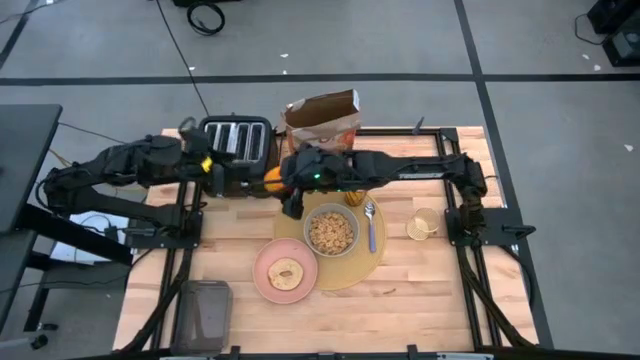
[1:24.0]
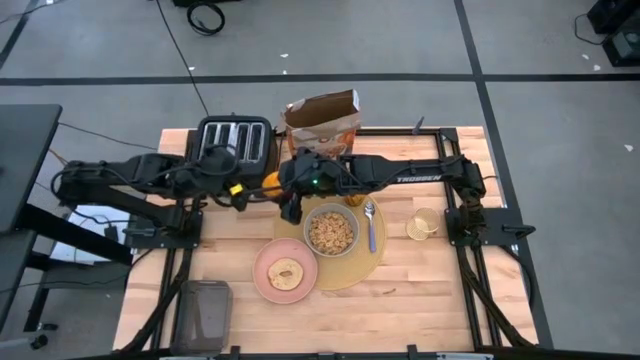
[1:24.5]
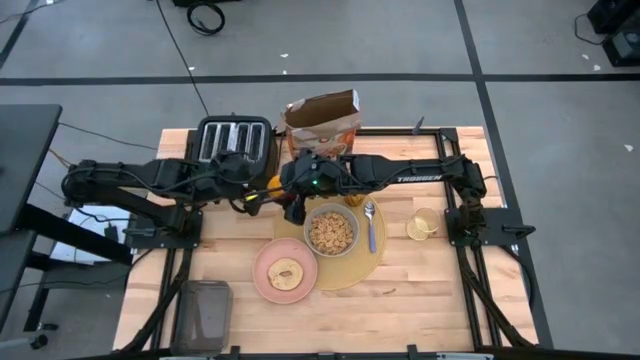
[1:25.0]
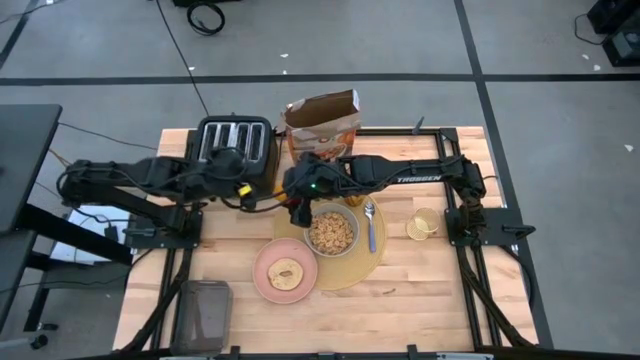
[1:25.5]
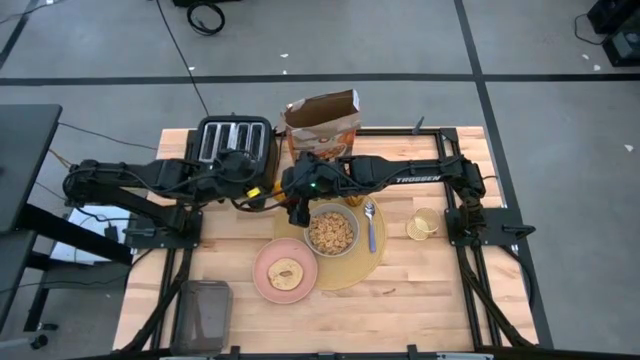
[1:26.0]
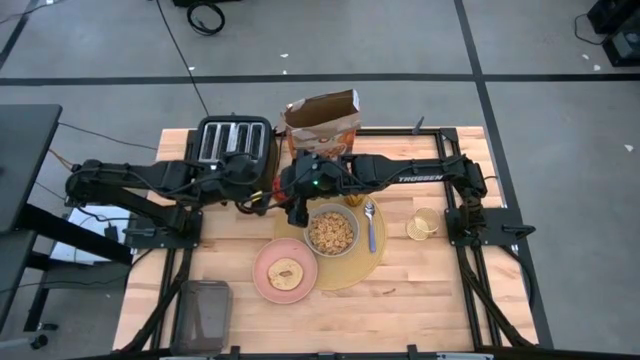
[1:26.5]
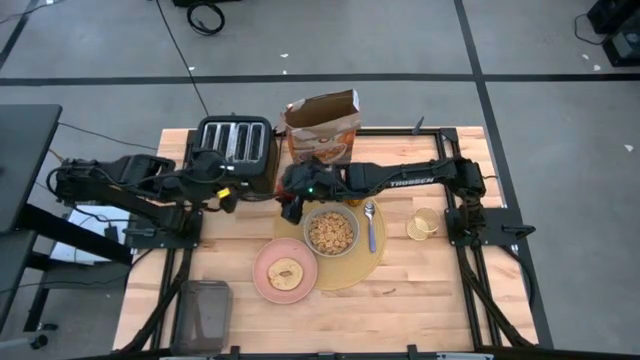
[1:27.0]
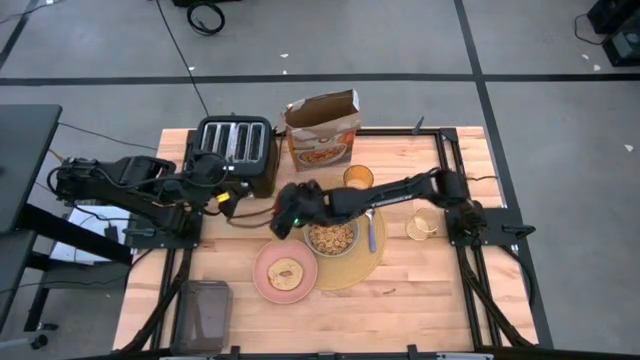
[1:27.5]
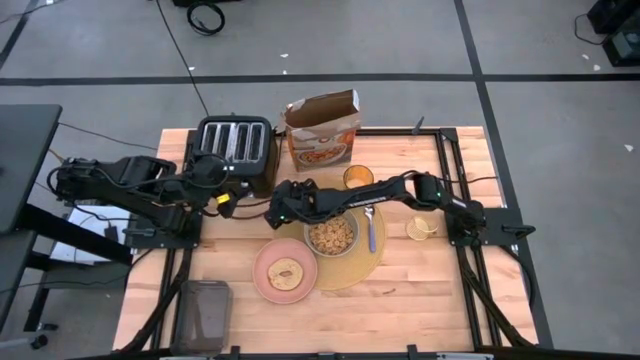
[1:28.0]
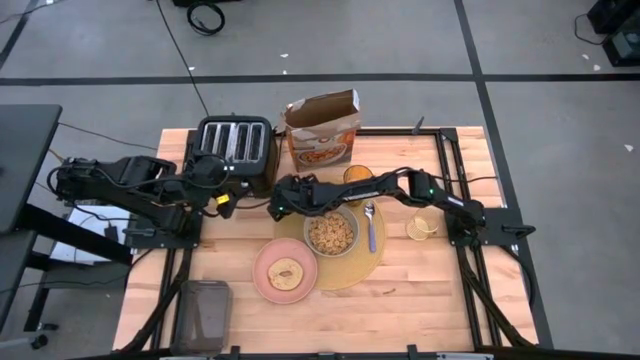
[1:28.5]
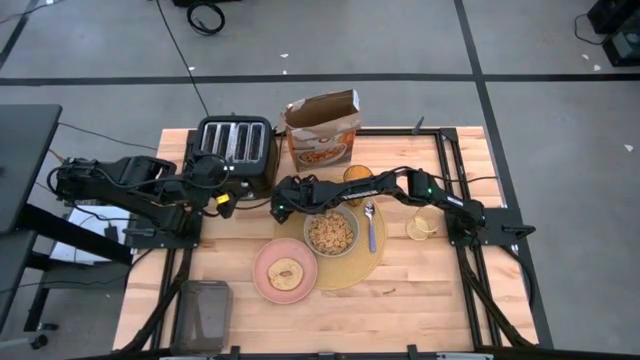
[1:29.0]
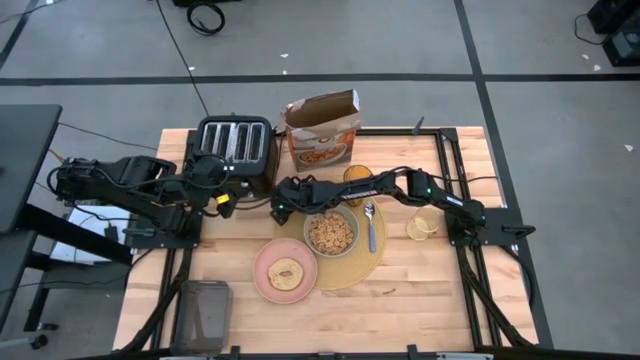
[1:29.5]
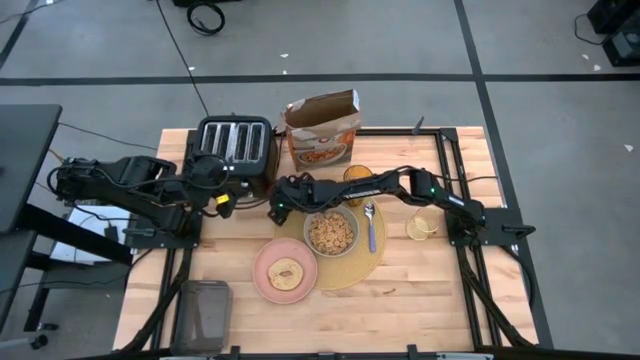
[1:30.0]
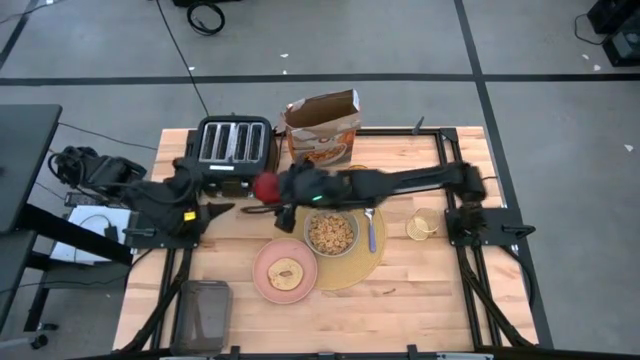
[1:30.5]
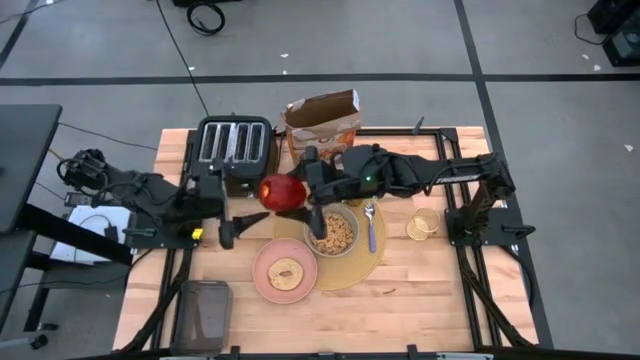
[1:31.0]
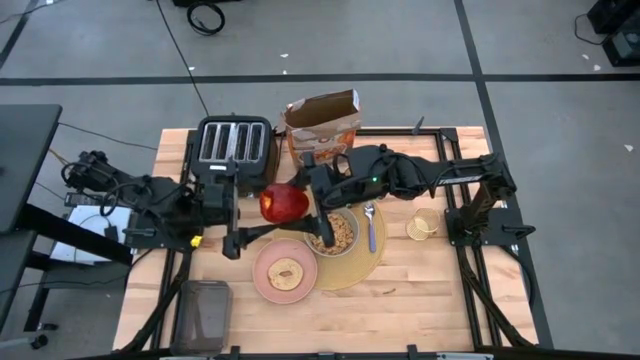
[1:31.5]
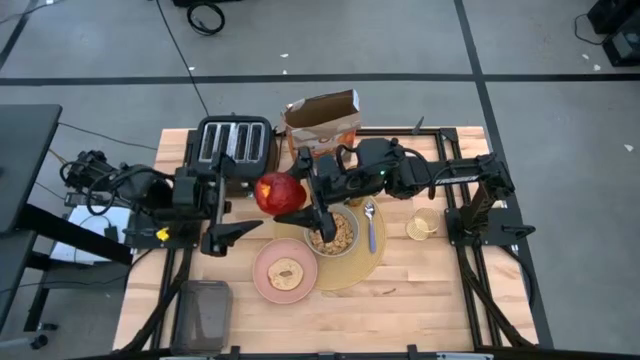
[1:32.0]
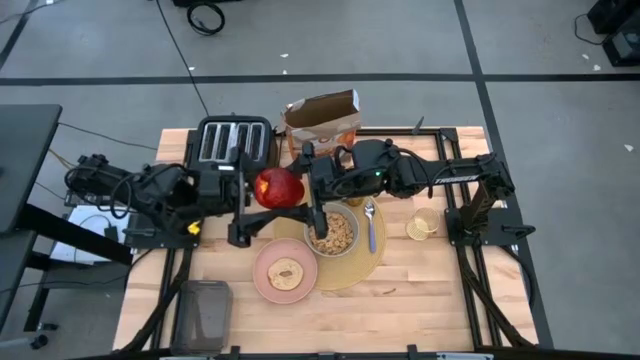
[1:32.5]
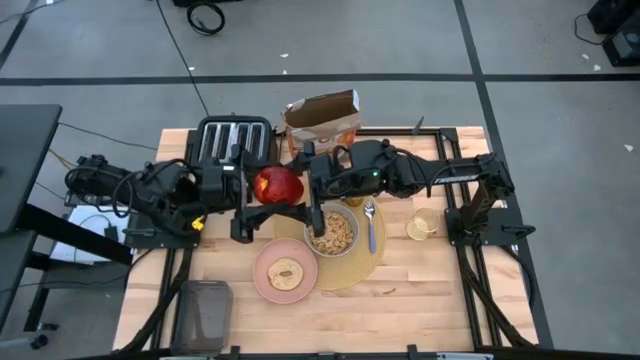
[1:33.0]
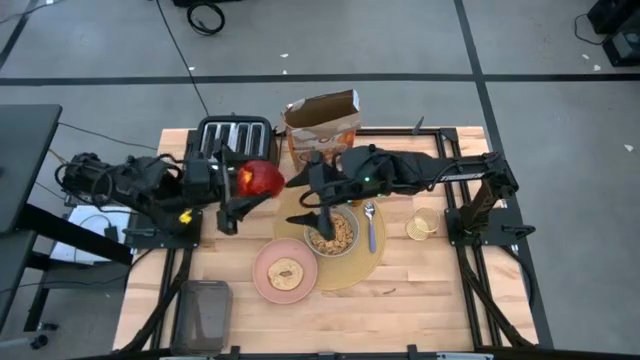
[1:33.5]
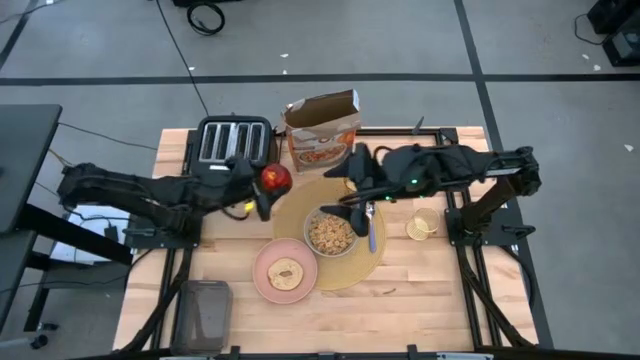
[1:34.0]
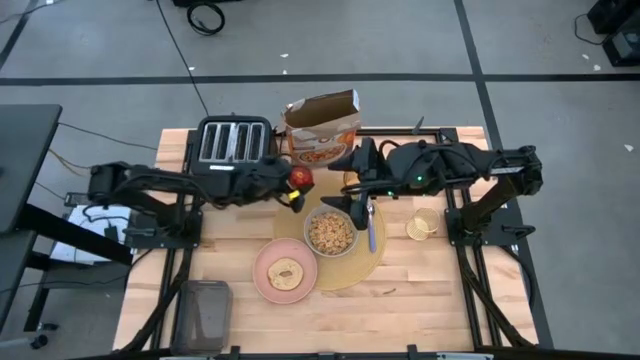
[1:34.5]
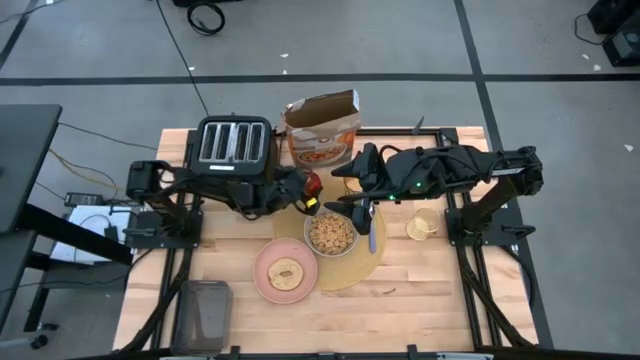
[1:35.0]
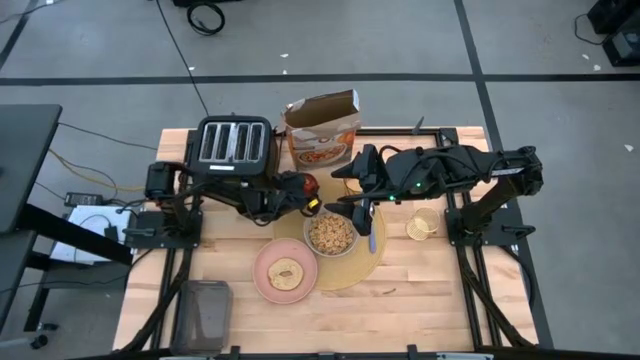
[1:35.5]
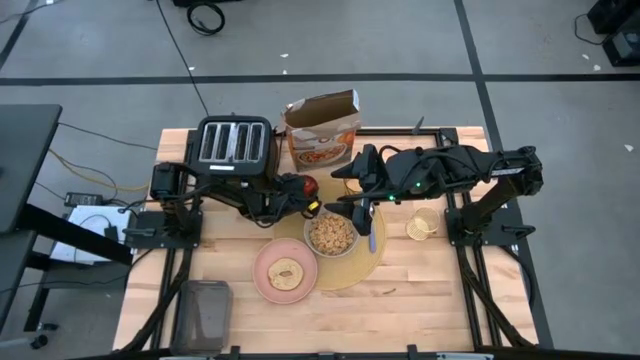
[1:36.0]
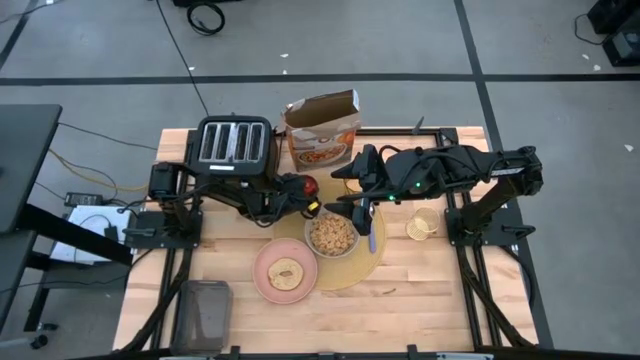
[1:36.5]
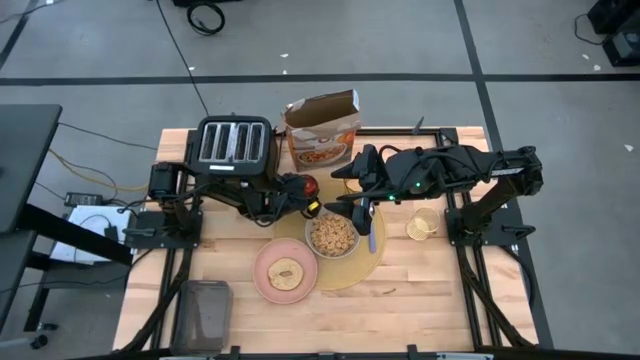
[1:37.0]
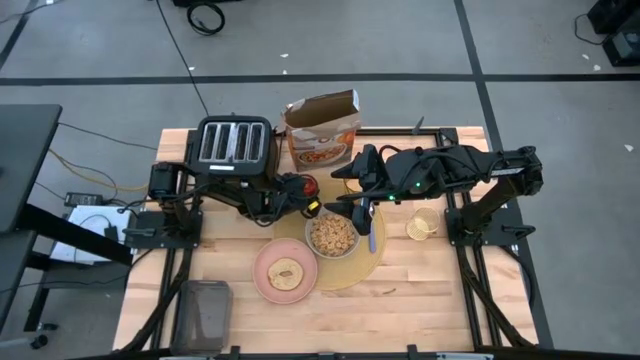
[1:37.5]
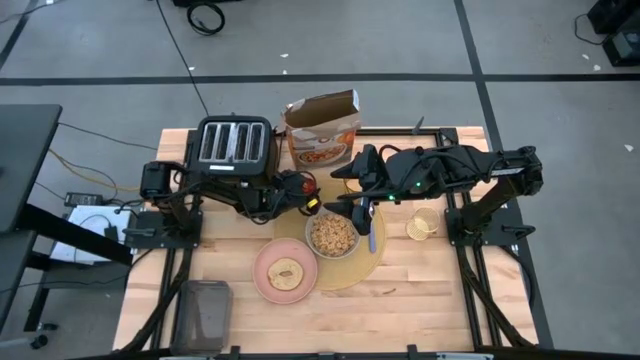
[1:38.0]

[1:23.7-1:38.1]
Task: Arrange a breakfast setting
Put the apple from the black bin on the brown table mat to the top left of the gray bowl

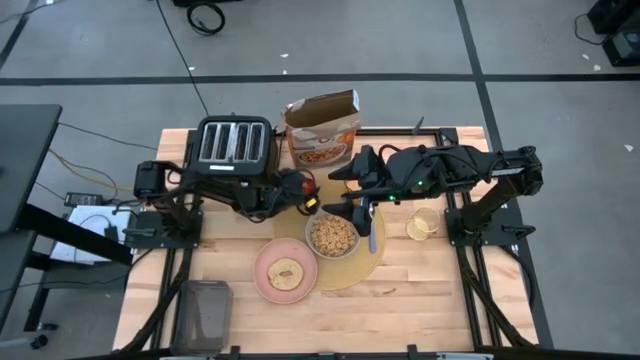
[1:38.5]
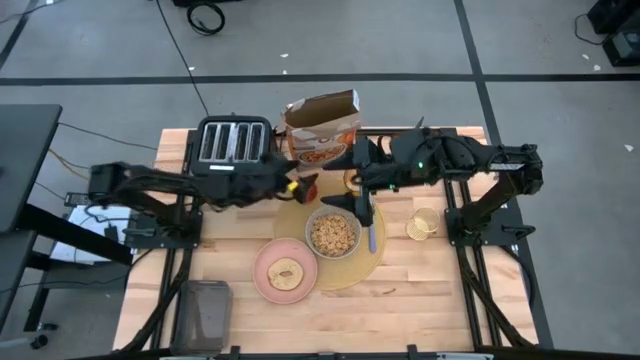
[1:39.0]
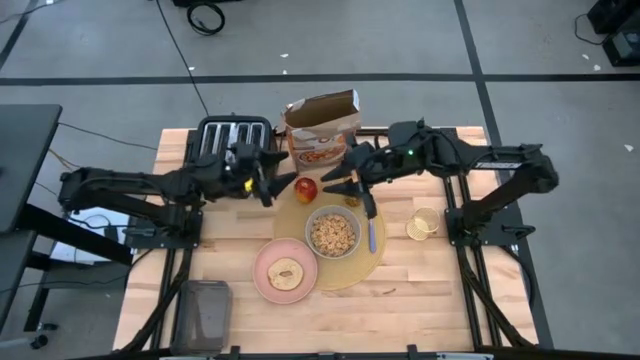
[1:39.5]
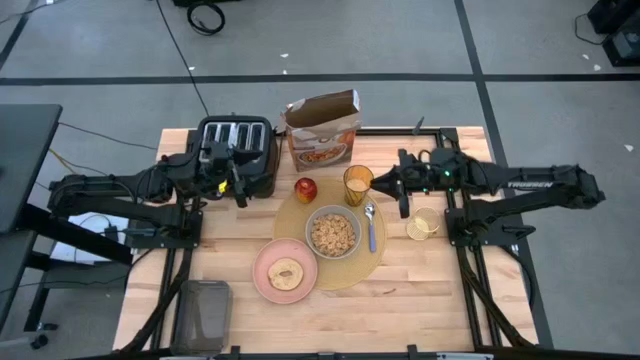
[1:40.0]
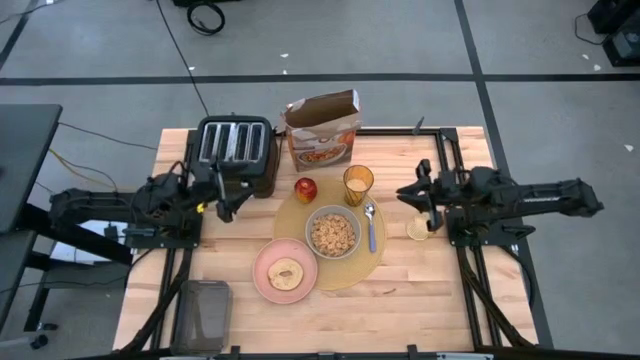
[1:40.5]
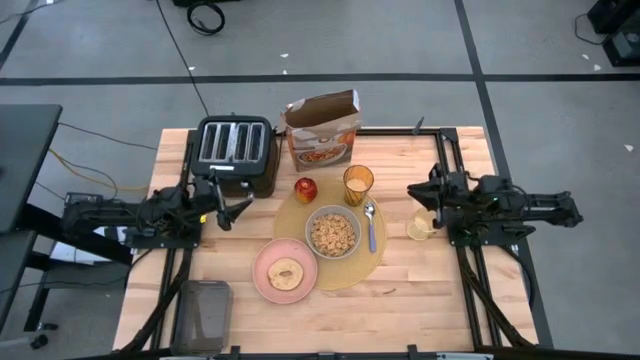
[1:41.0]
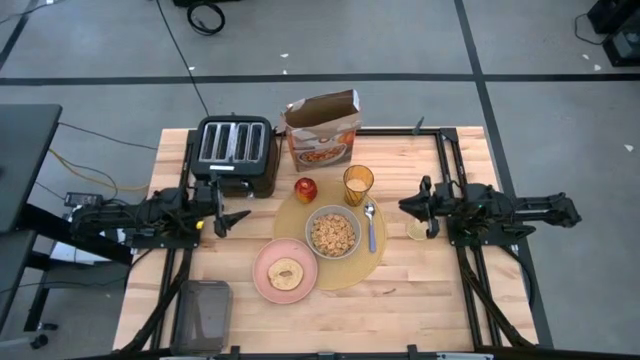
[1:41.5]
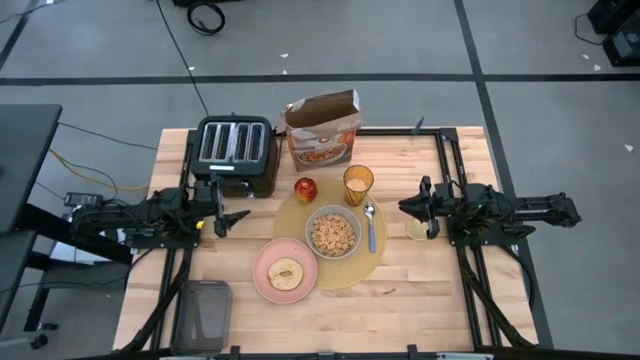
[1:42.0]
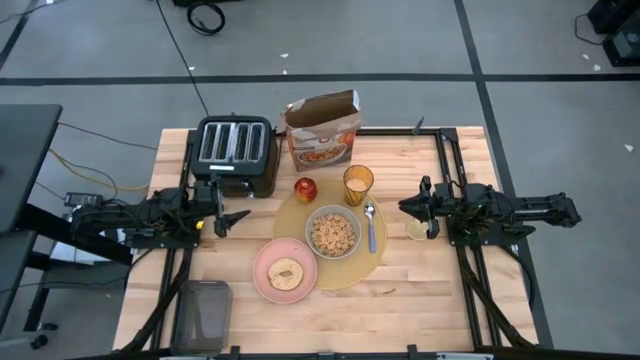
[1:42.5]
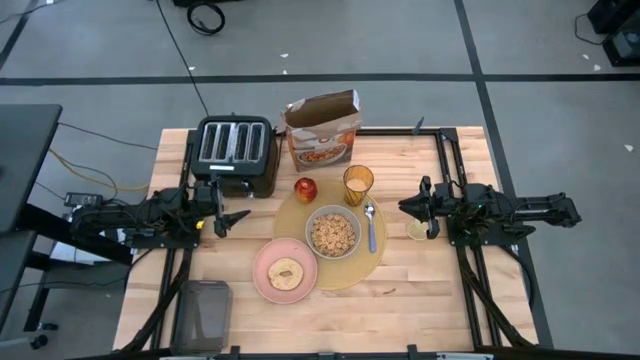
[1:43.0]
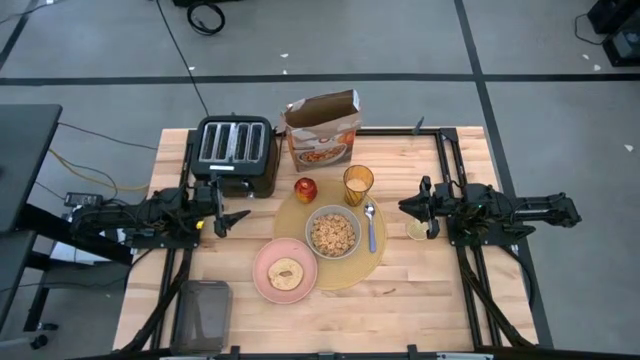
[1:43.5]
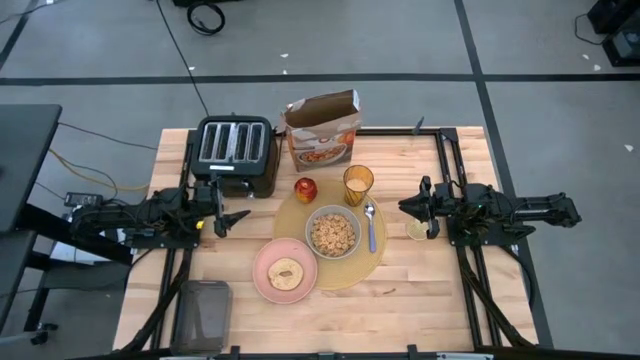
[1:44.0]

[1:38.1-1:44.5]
Return to Home Position

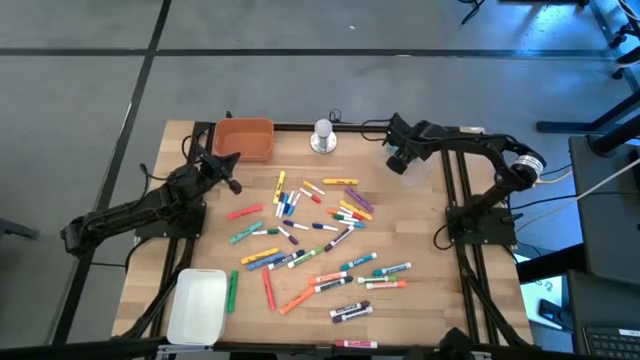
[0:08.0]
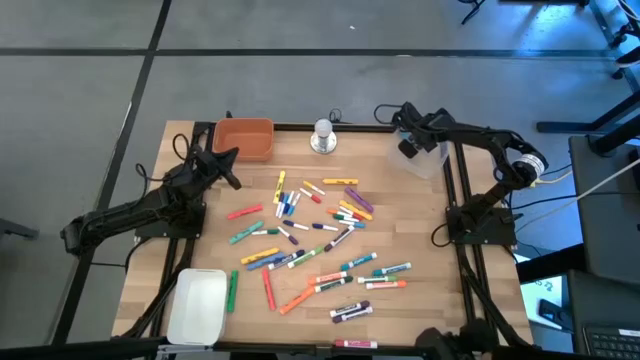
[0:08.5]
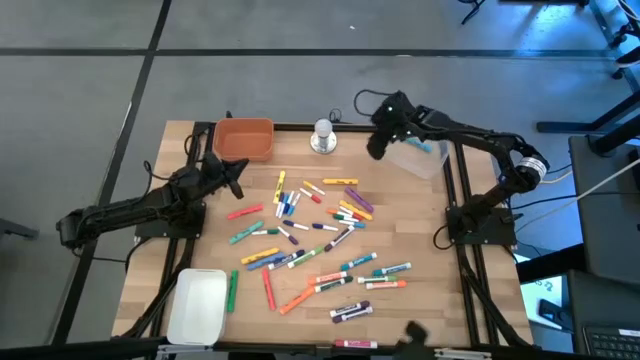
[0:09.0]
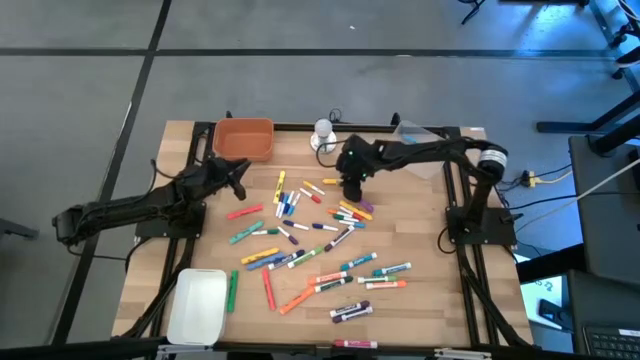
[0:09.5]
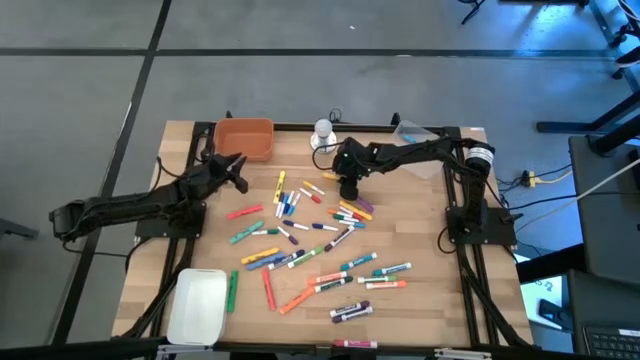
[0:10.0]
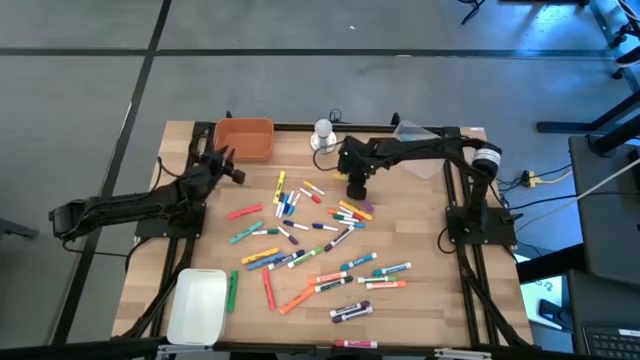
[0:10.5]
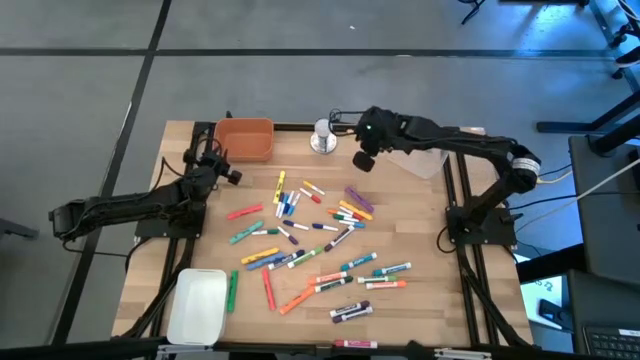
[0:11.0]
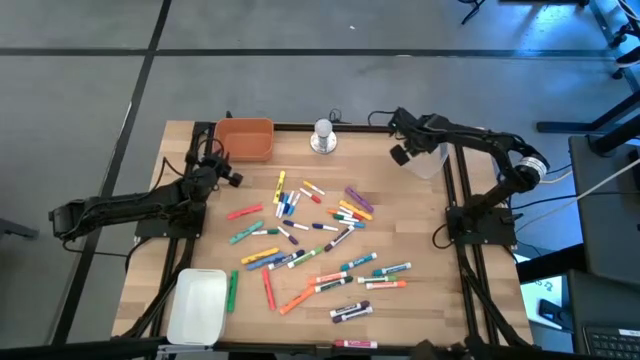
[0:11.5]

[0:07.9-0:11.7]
Task: Pick & Place Markers
Put the large yellow highlighter pen into the transparent bin
